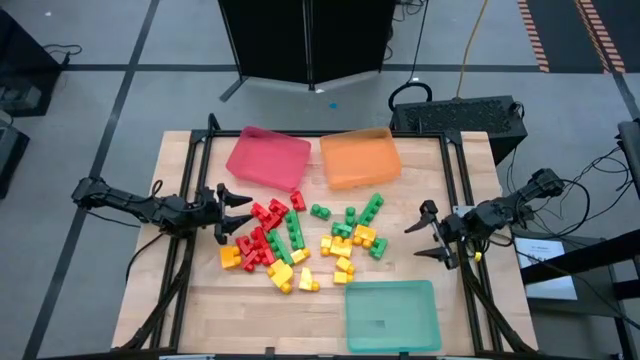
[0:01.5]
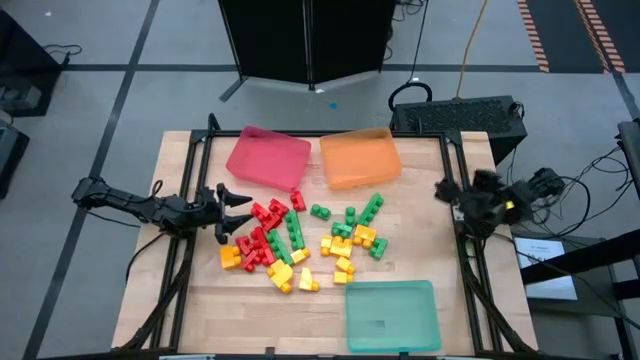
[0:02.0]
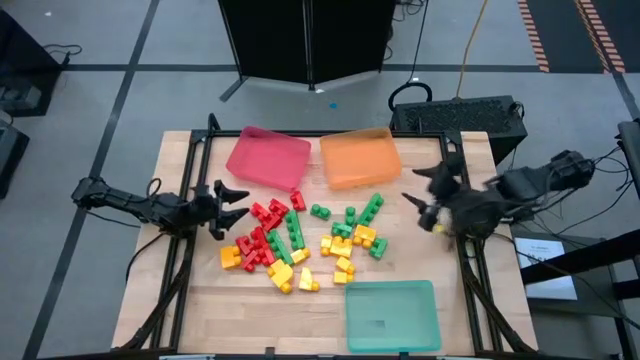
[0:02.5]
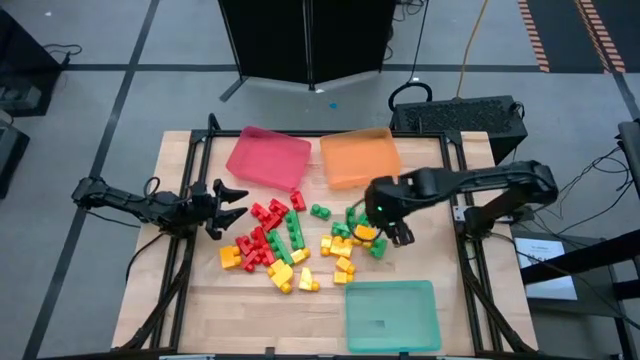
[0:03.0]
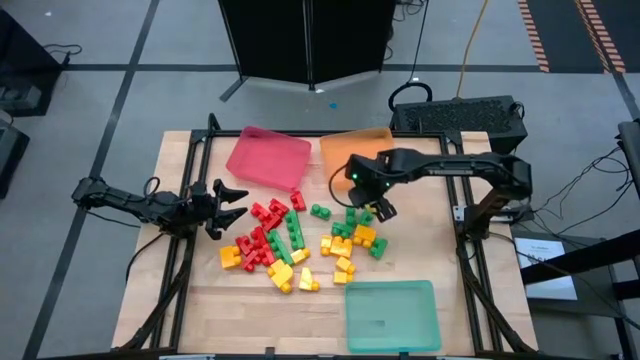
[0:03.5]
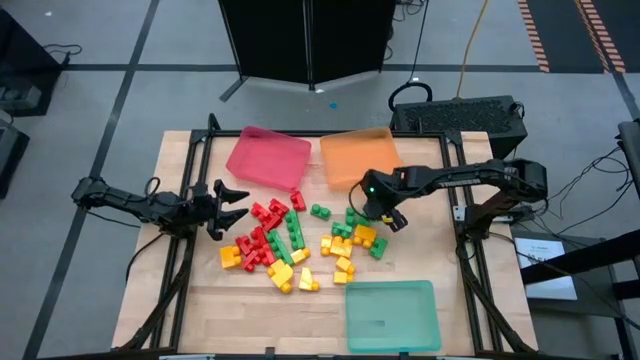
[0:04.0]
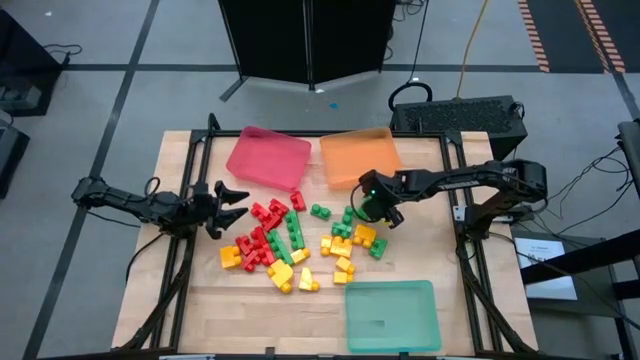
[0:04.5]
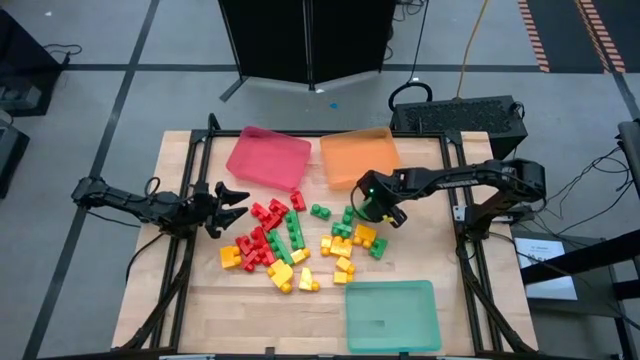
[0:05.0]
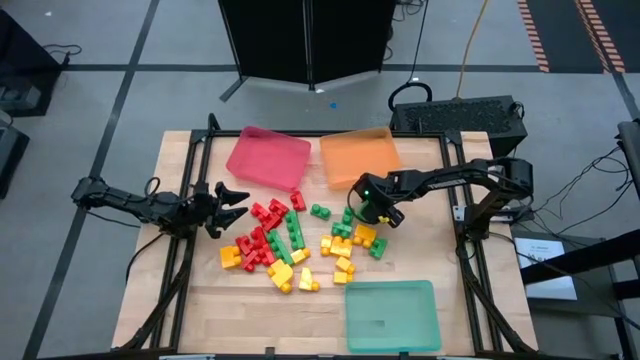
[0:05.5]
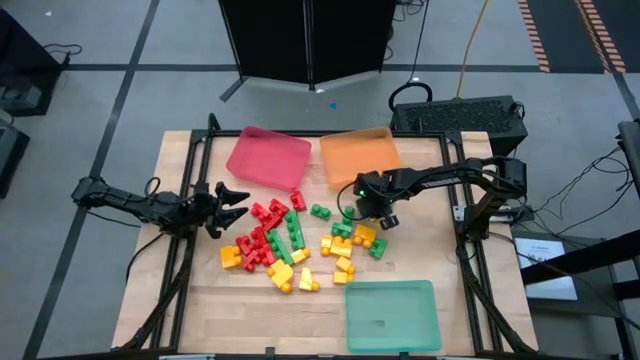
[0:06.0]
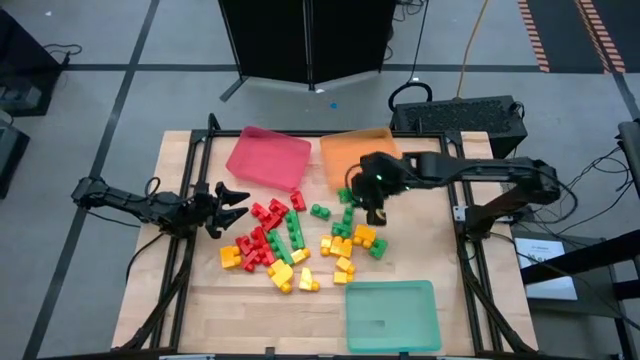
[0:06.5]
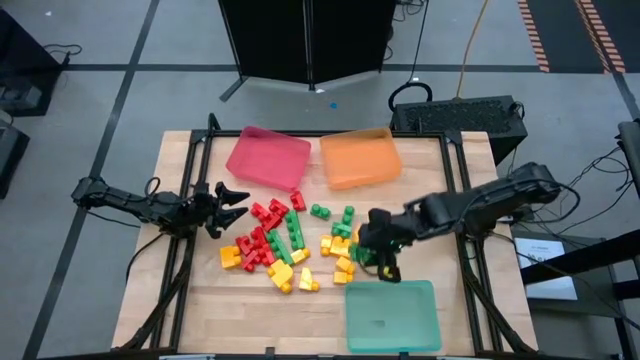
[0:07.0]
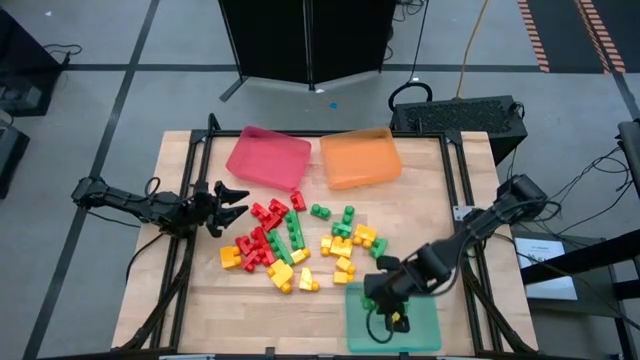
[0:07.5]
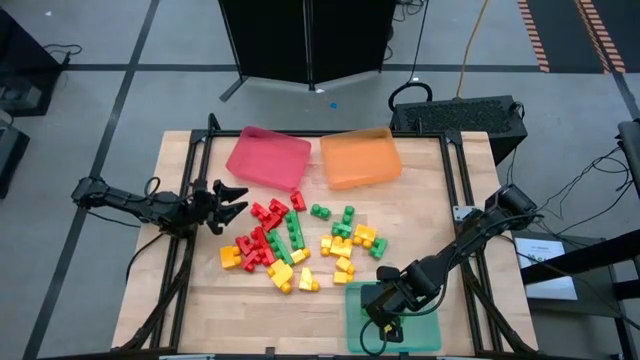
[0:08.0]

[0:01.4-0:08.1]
Task: Sort blocks
Put the green game piece into the green bin

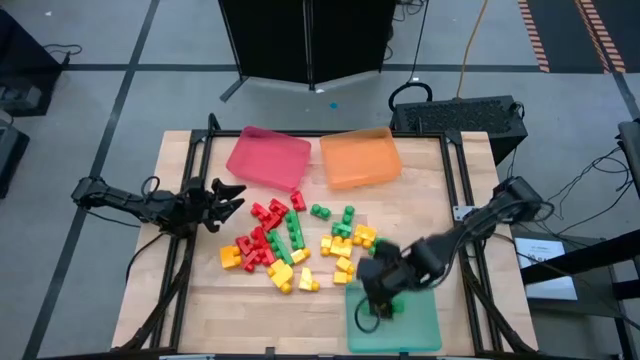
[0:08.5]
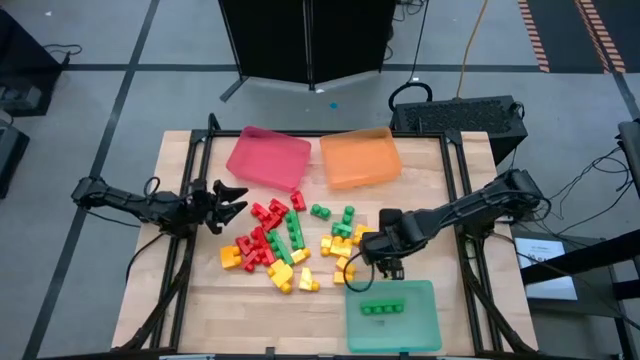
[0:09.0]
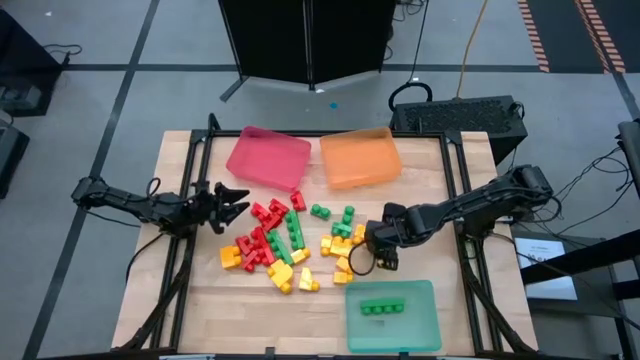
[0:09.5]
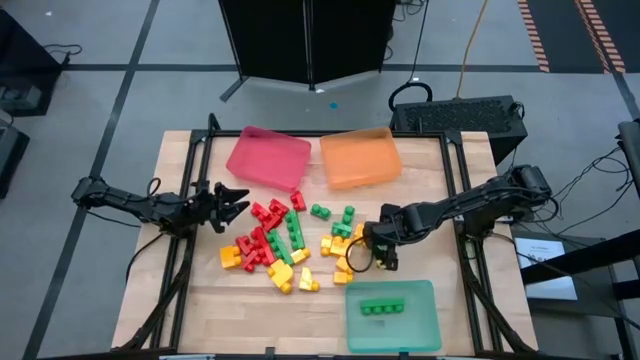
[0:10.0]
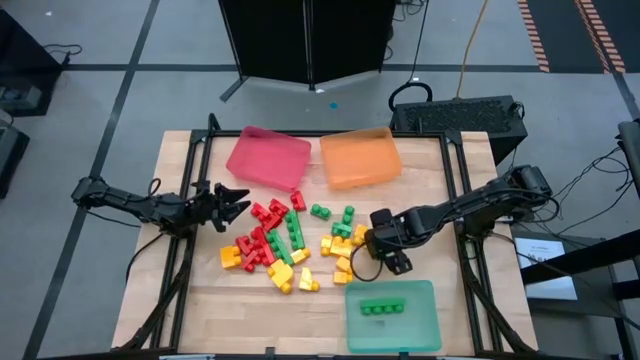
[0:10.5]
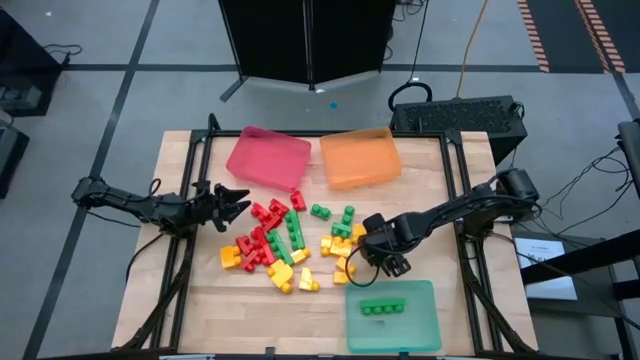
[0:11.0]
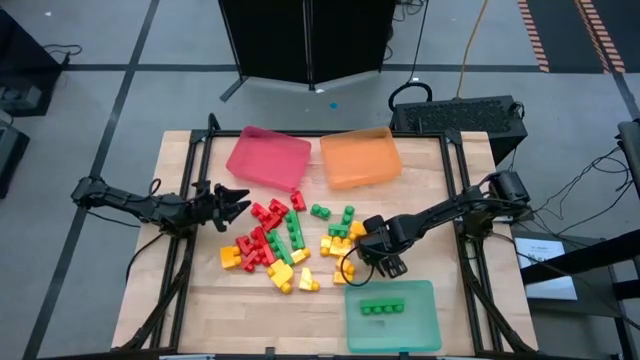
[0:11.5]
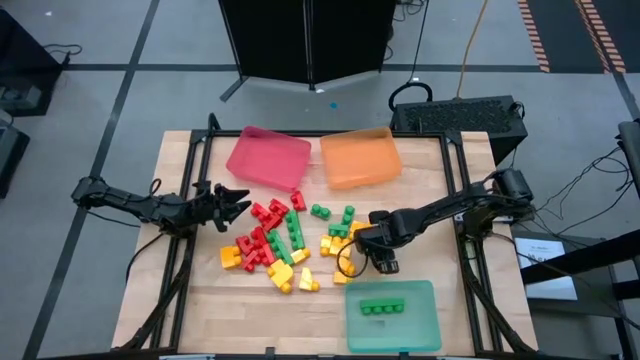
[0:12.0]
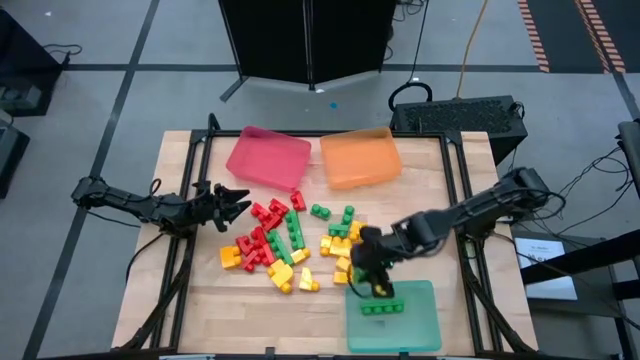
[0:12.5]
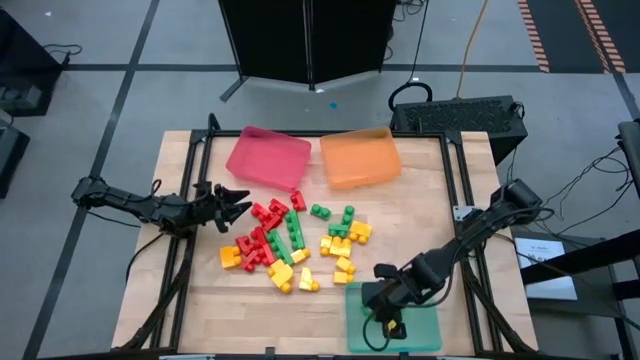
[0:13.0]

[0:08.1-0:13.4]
Put the green game piece into the green bin

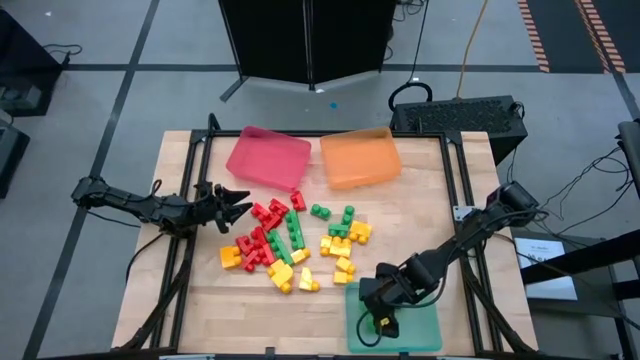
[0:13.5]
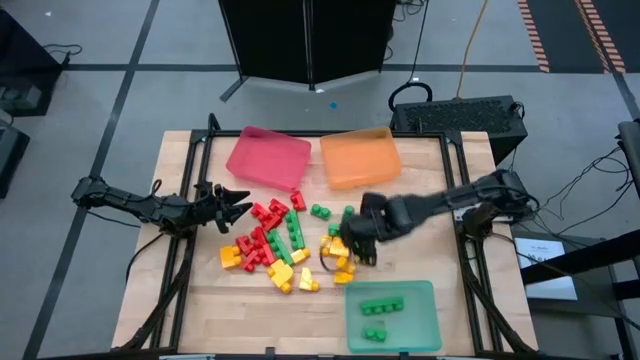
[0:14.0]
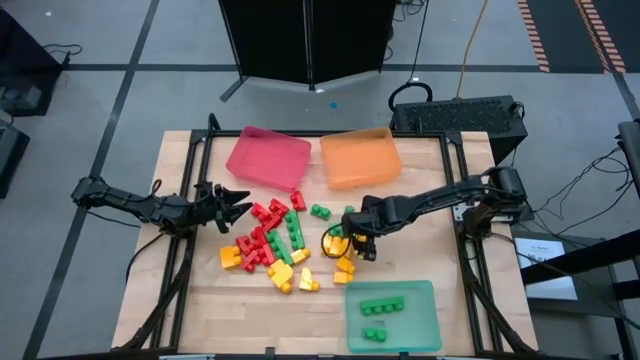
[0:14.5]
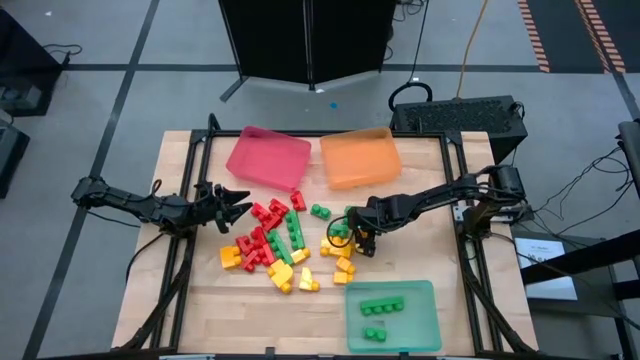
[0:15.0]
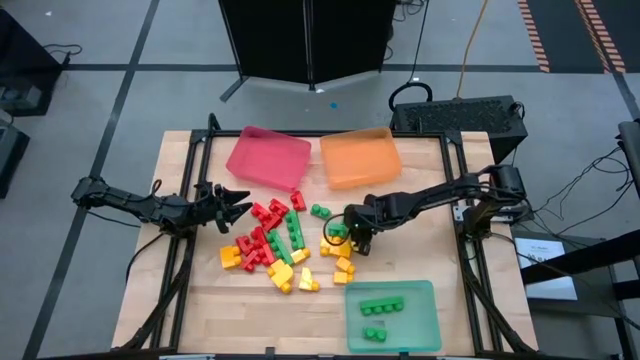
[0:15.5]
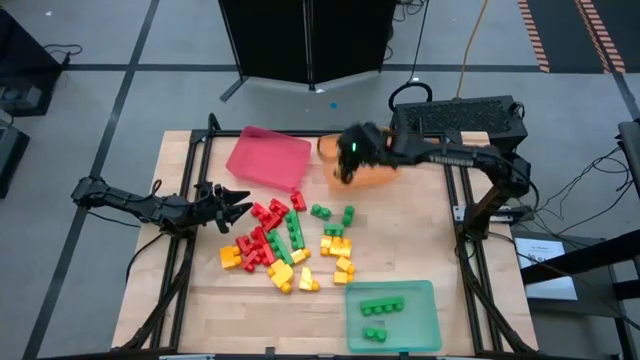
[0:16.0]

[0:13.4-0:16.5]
Put the yellow game piece into the orange bin

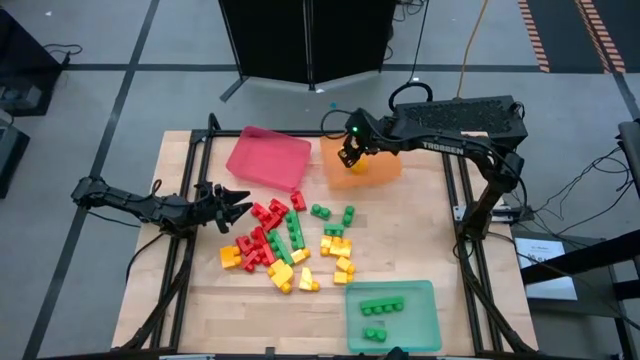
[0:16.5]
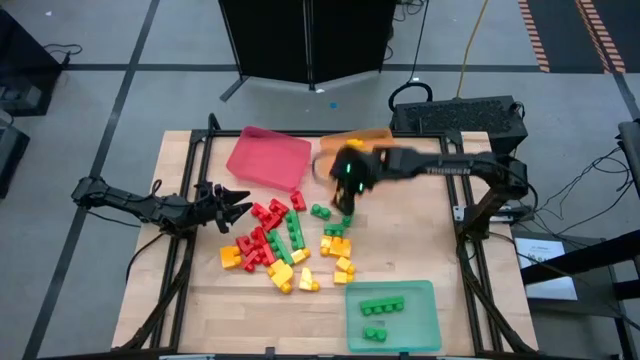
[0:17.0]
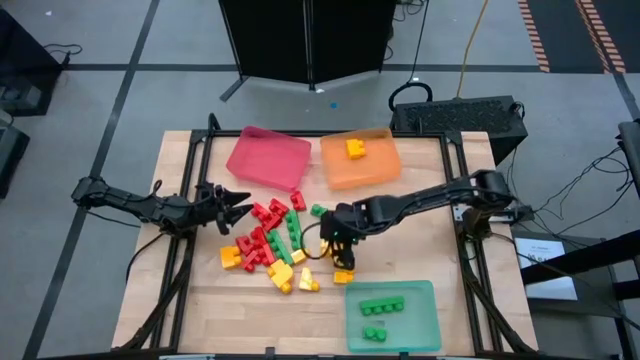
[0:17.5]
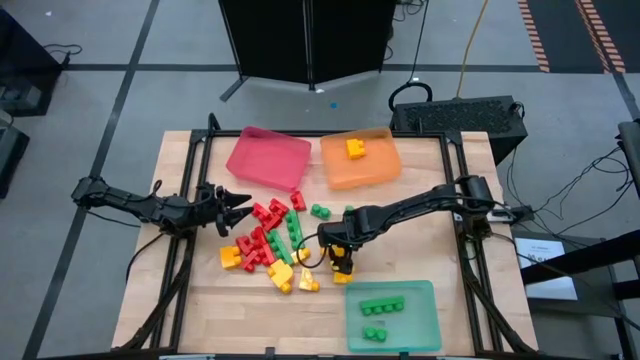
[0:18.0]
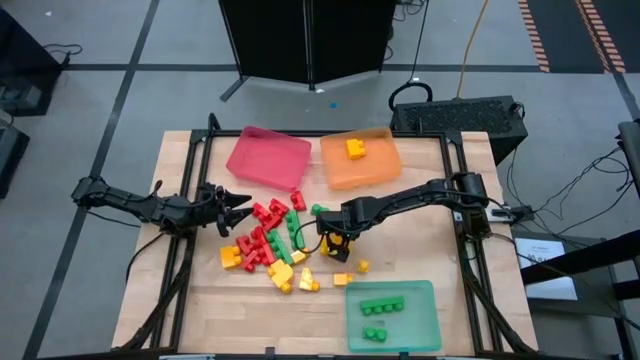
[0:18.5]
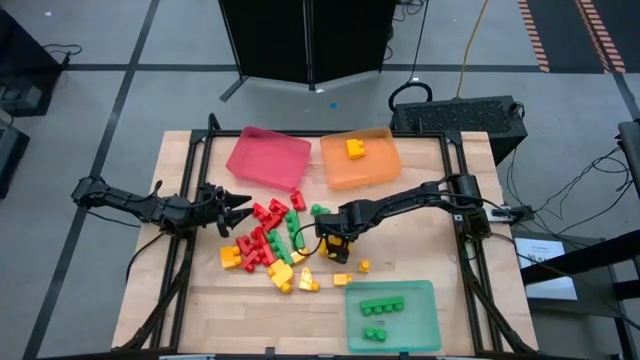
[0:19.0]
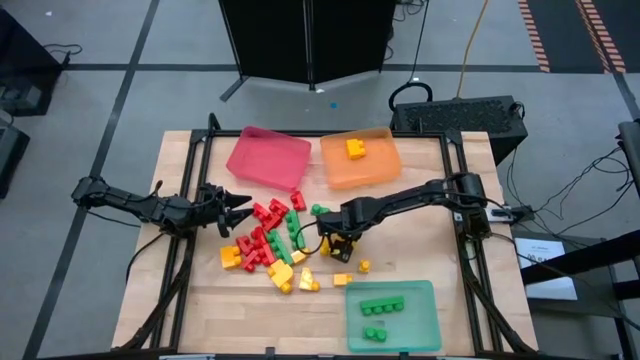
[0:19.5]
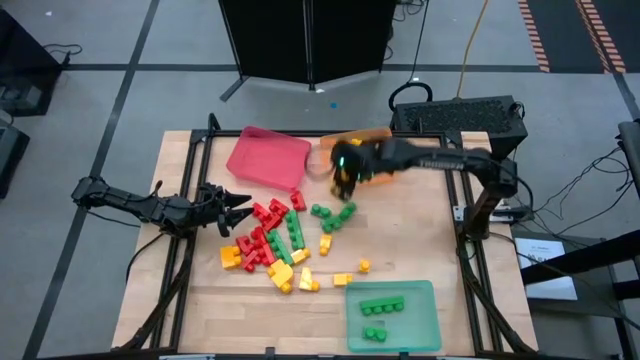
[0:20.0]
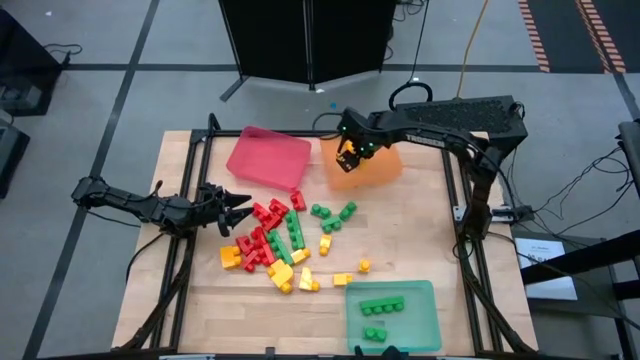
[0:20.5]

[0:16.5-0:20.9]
Put the yellow game piece into the orange bin

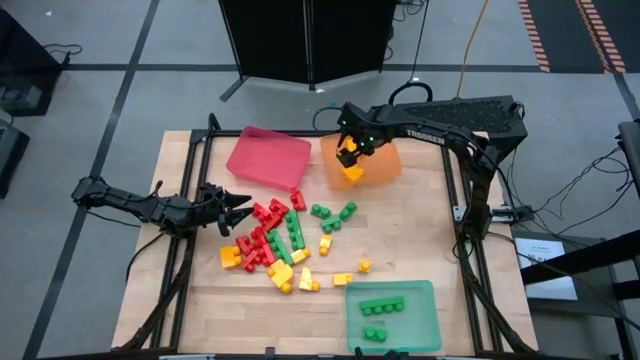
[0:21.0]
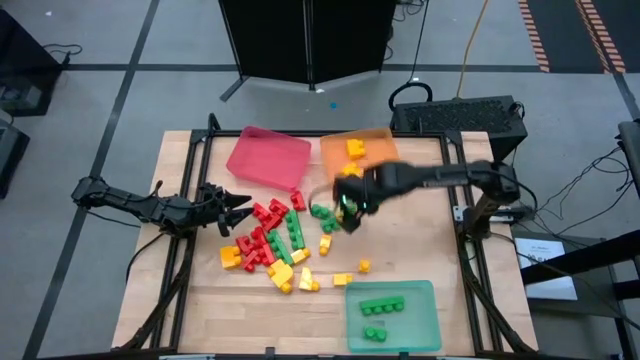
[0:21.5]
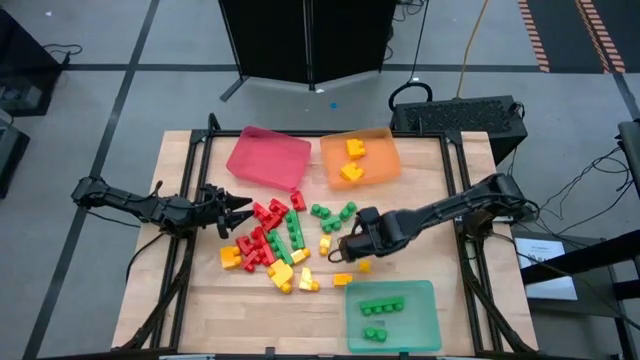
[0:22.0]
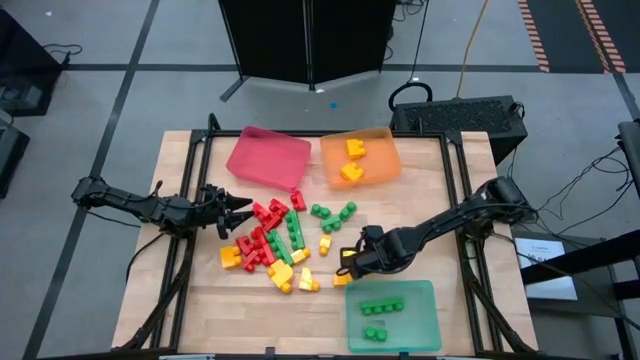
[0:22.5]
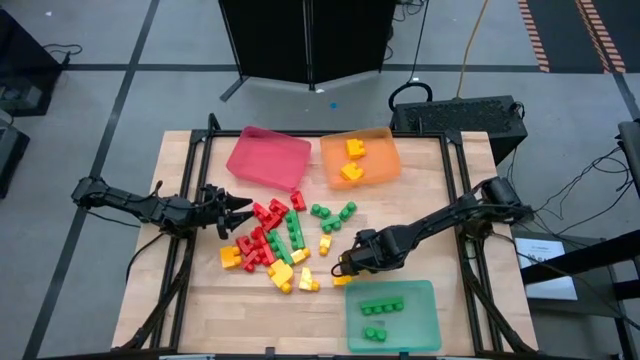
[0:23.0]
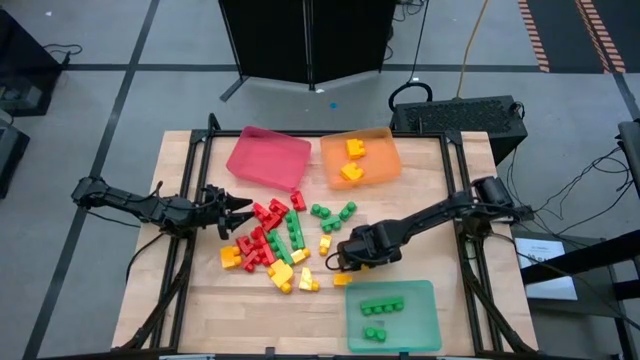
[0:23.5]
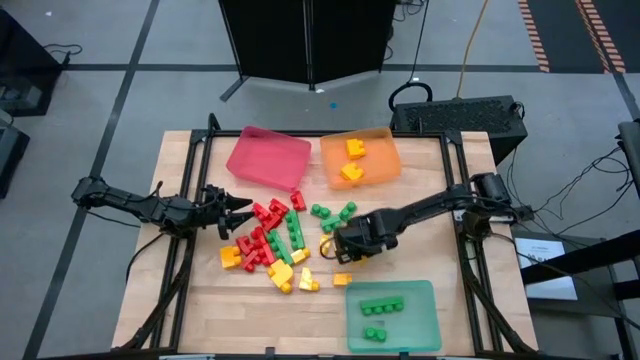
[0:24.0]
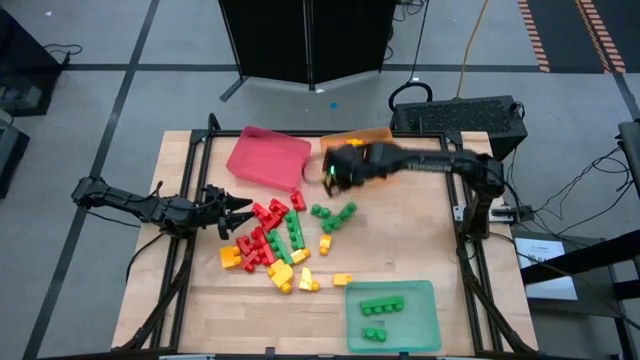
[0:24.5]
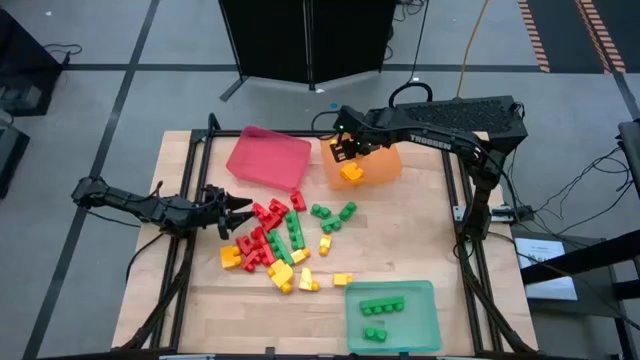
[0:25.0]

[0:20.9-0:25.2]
Put the yellow game piece into the orange bin
